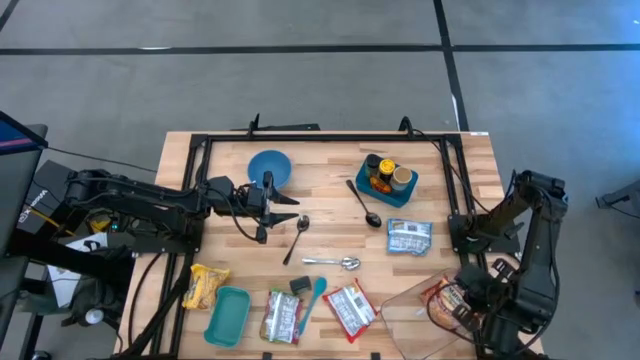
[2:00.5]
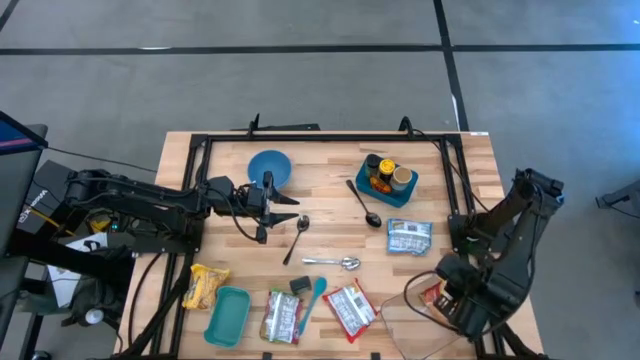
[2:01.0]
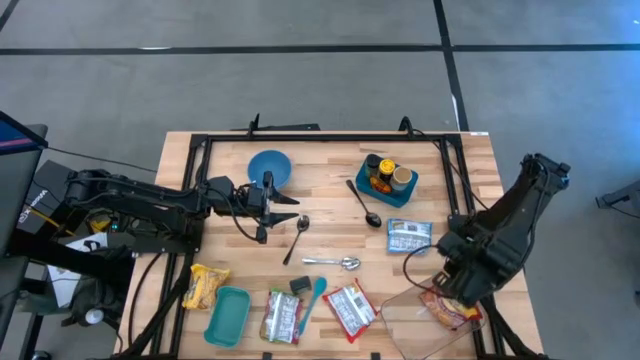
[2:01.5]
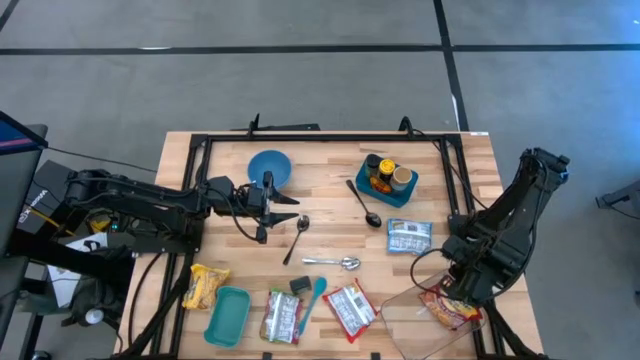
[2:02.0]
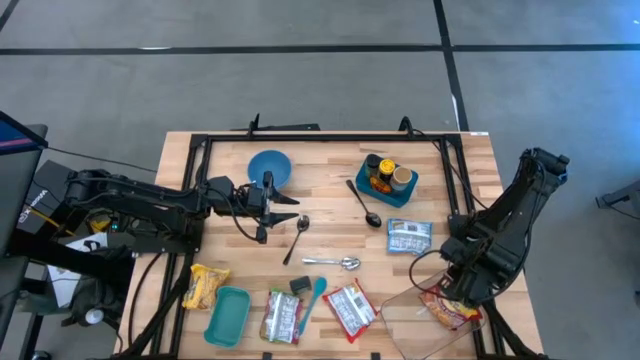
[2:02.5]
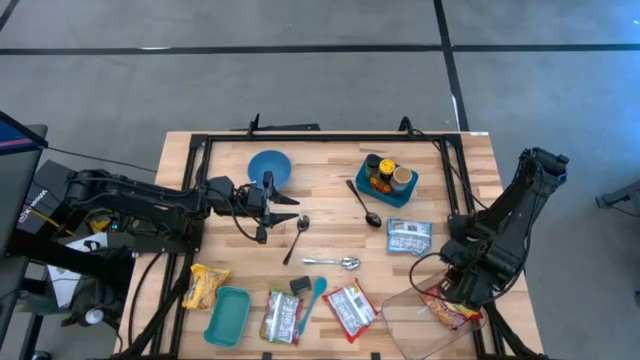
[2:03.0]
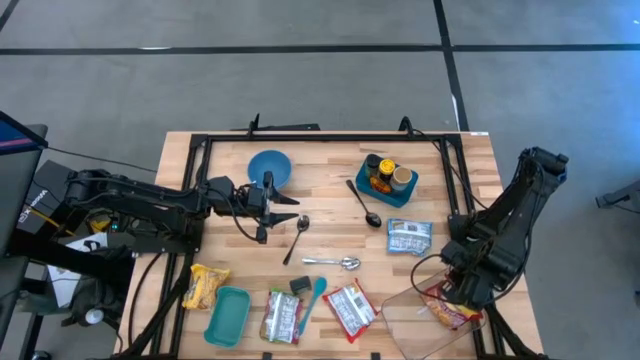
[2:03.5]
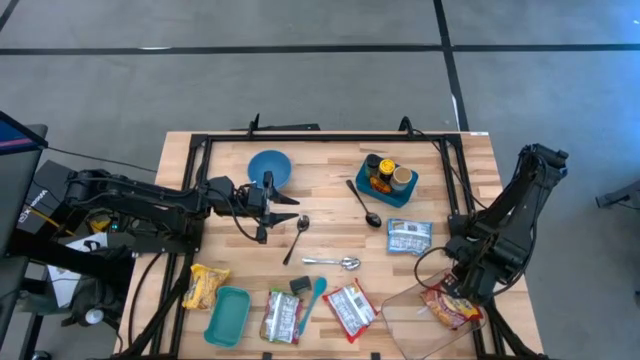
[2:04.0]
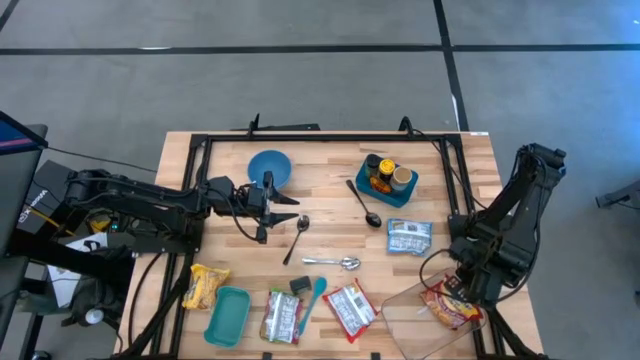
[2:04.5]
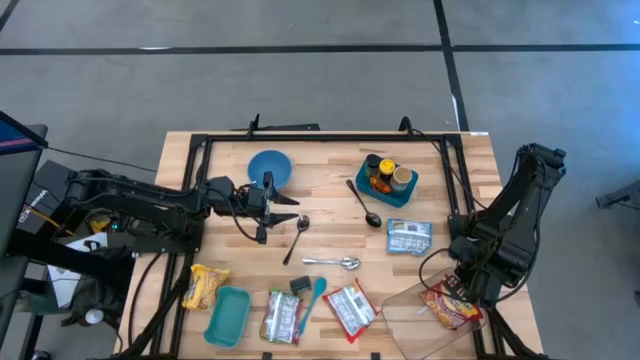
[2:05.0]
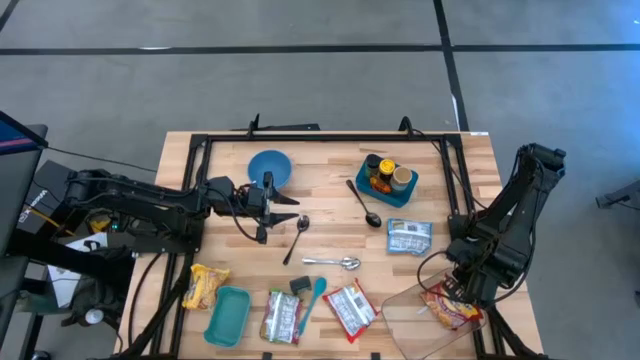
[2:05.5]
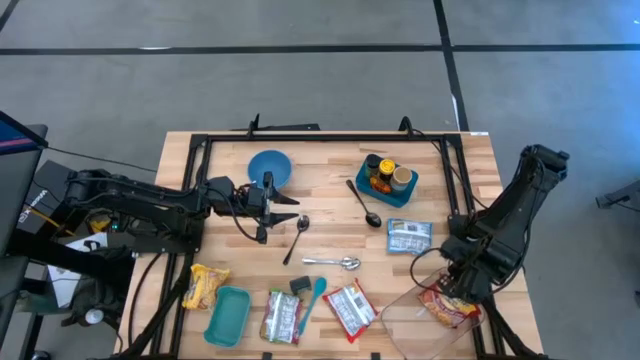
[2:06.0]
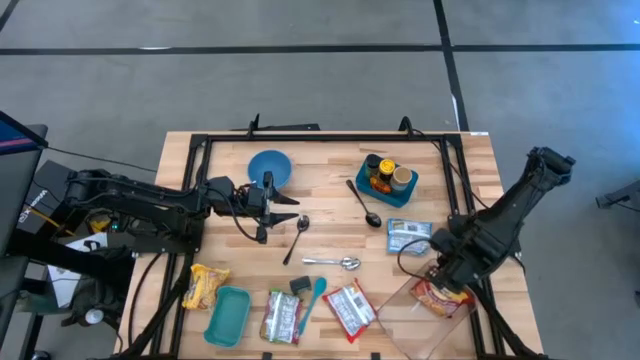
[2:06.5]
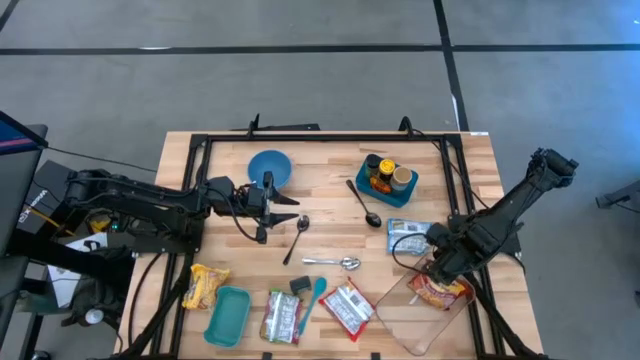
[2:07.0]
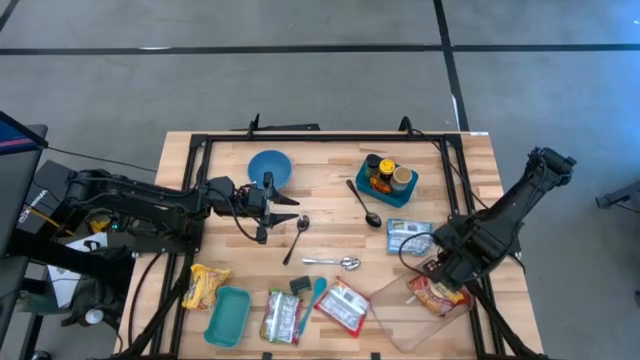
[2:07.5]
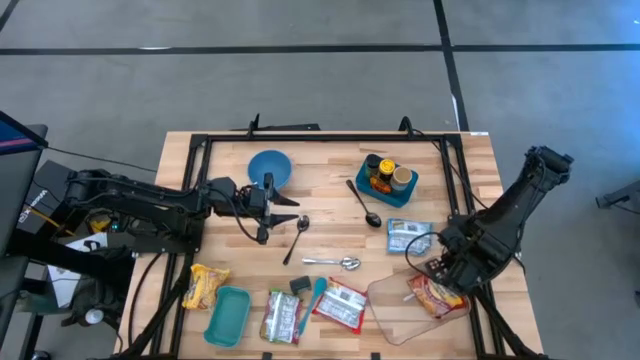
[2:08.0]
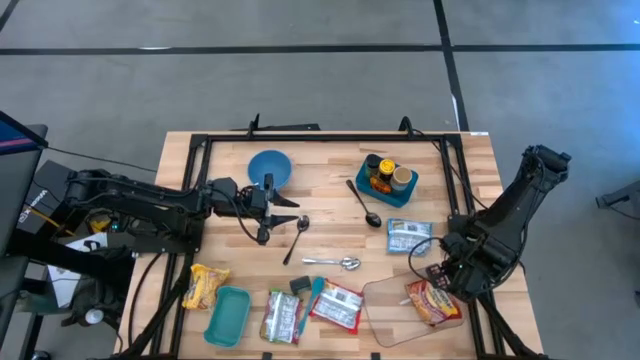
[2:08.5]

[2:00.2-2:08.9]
Task: Pick & Place Food Item
Adjust the transparent bin

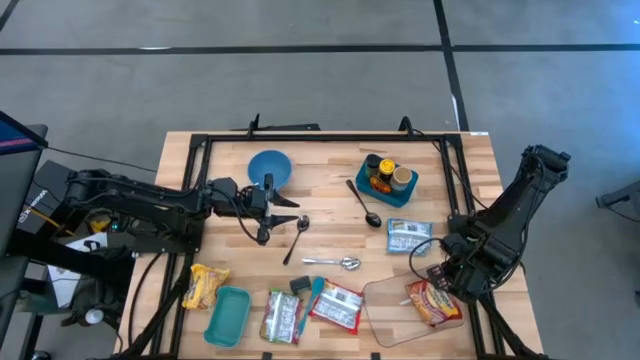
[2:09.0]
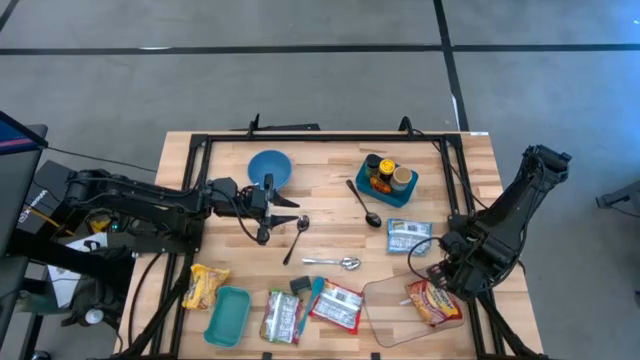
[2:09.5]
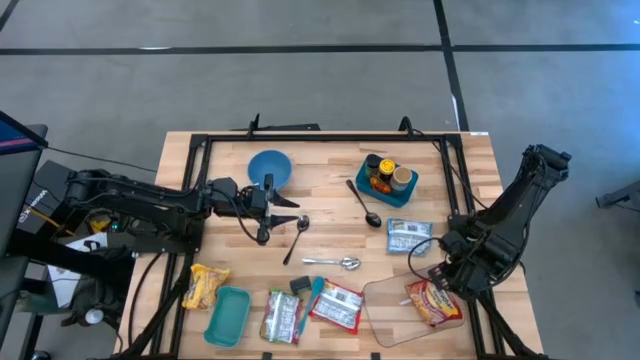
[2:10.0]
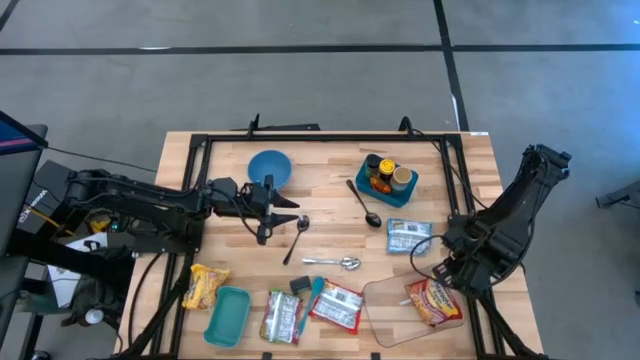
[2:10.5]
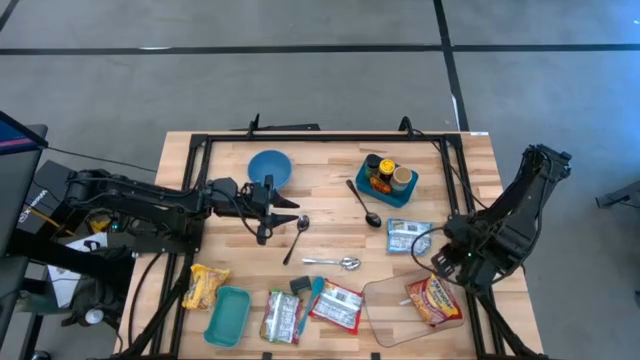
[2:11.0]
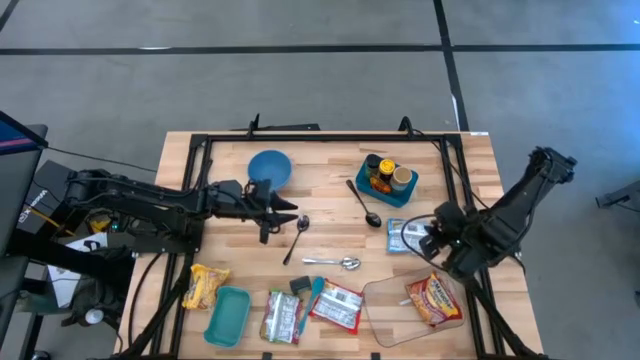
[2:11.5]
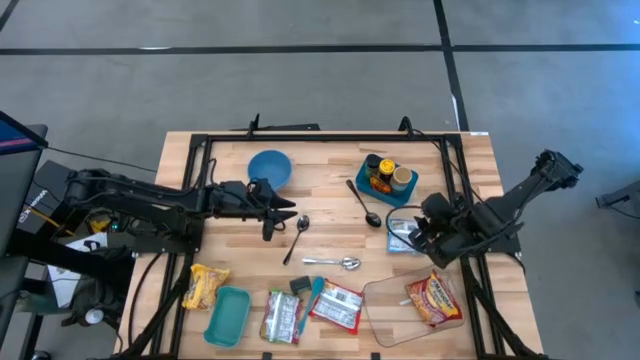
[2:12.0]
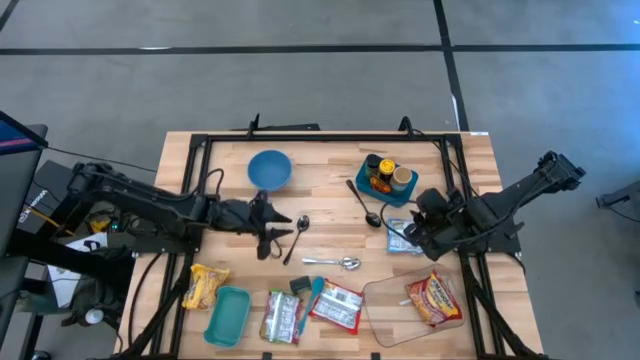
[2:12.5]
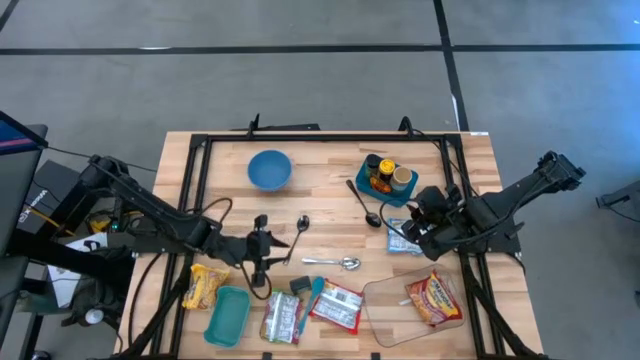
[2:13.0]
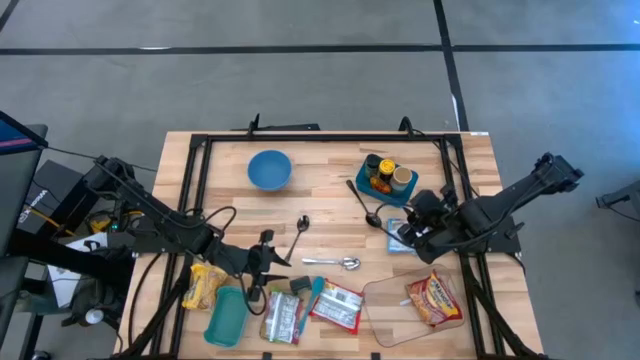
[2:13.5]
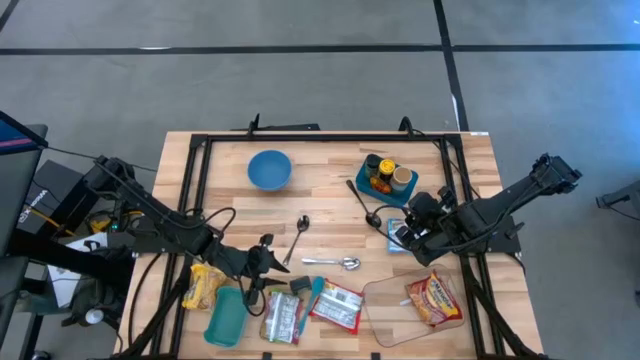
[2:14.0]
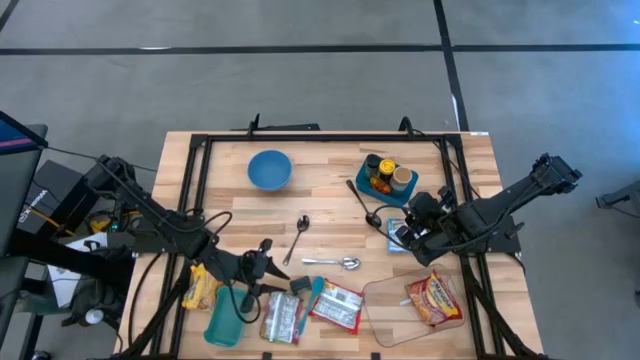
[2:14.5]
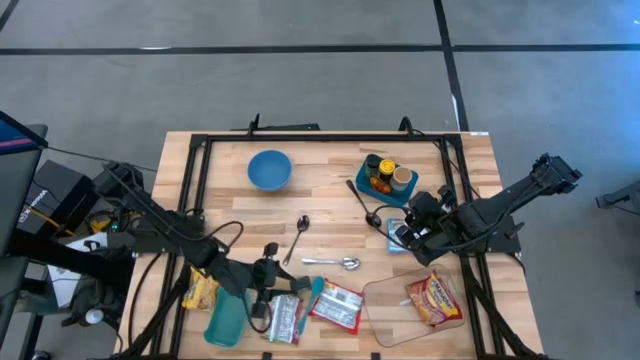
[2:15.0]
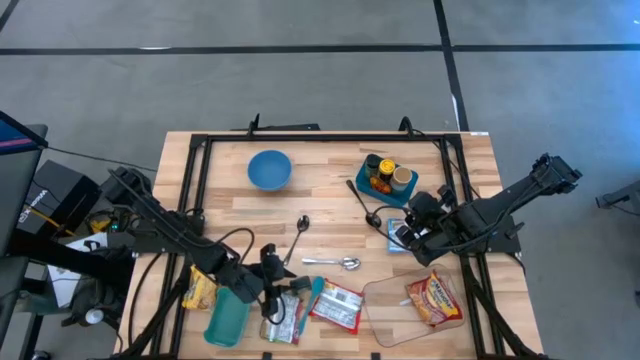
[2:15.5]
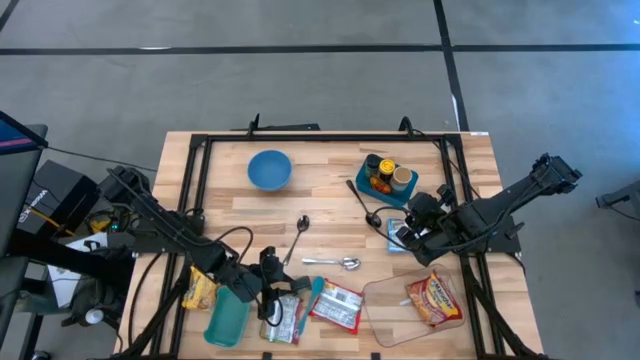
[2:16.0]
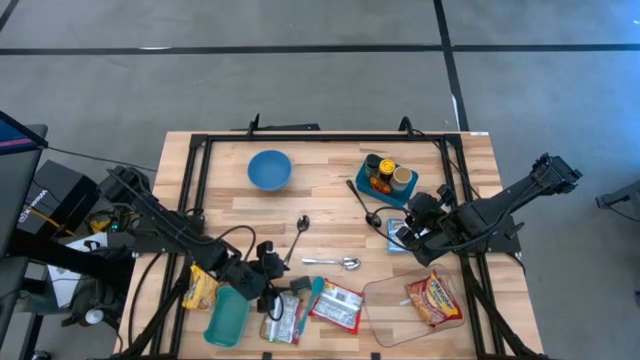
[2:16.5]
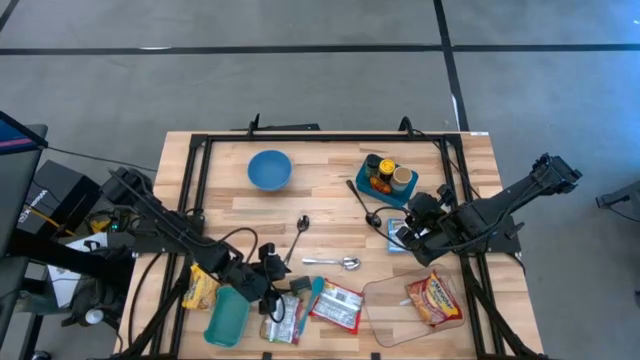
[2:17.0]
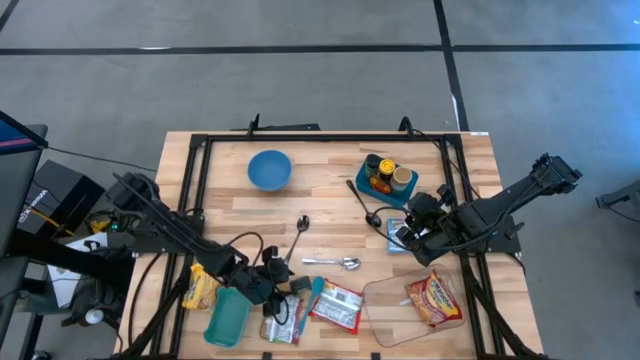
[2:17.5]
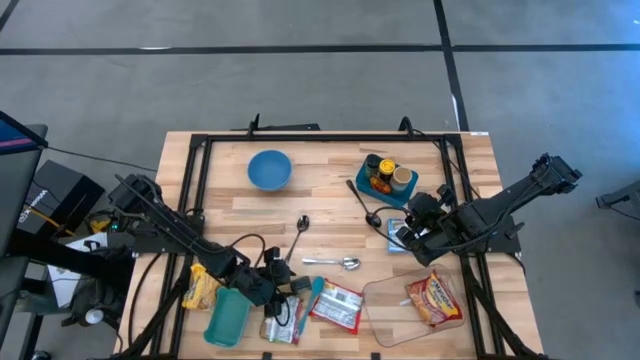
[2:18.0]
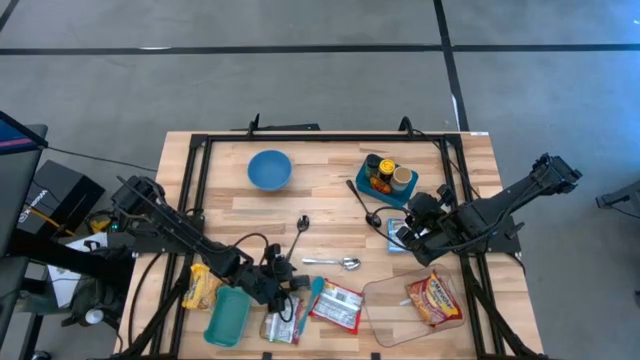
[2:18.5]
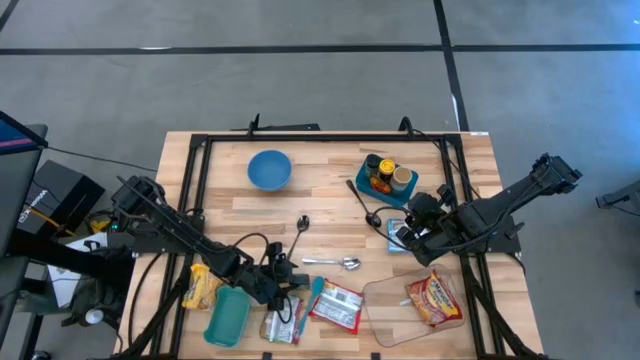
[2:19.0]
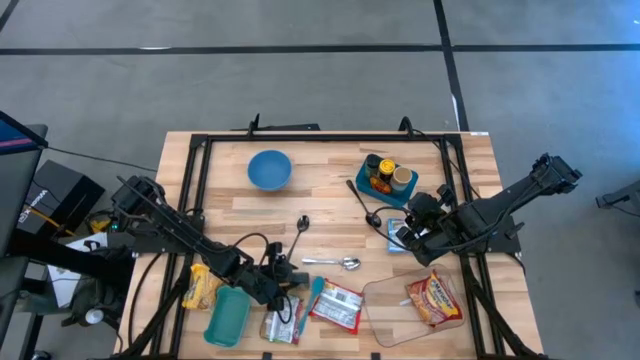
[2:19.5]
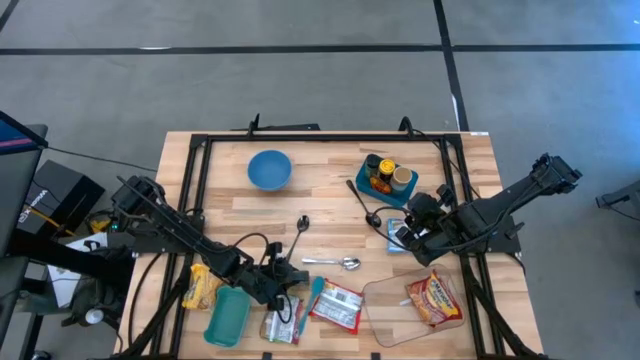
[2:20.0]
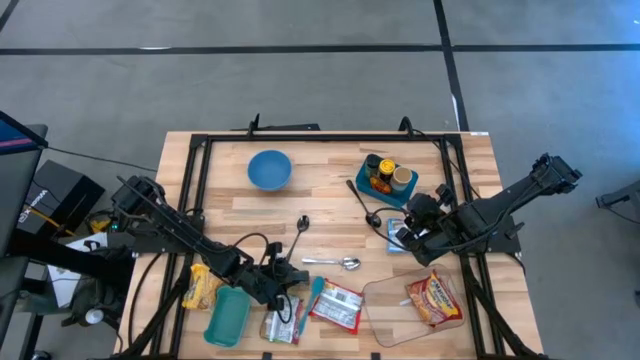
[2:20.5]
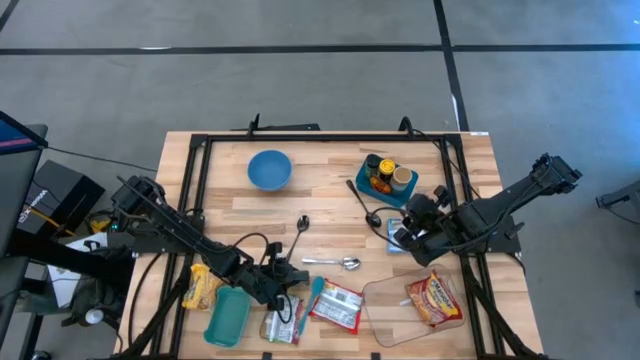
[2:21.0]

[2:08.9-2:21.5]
Put the black seasoning can into the blue bin

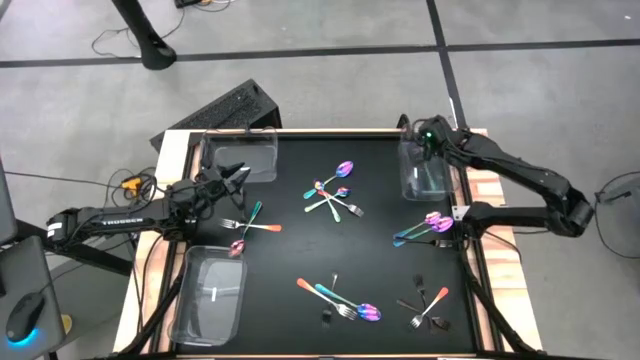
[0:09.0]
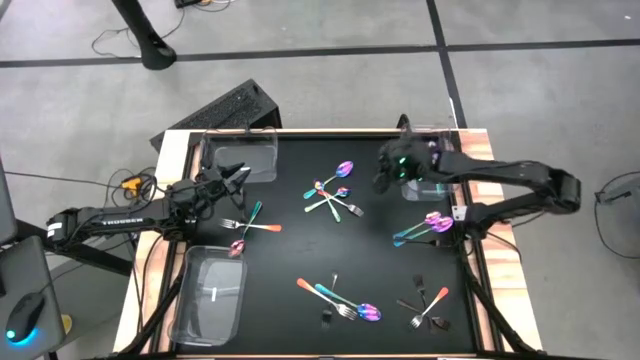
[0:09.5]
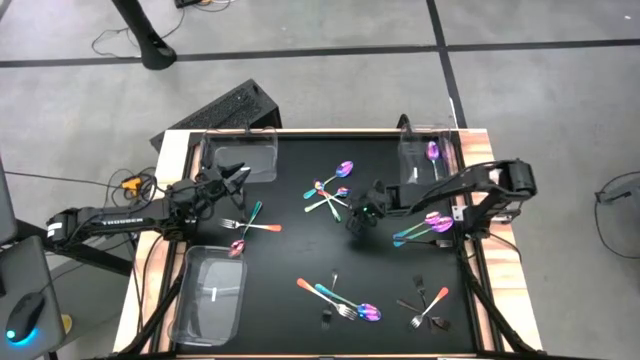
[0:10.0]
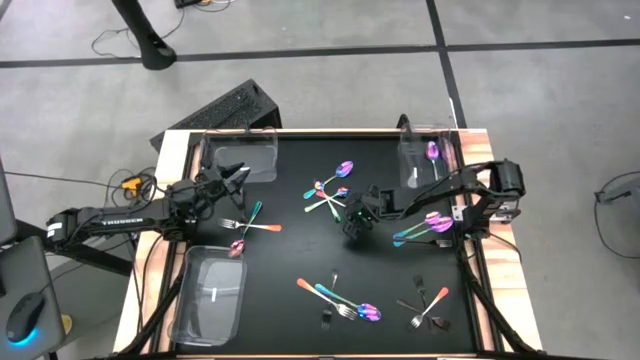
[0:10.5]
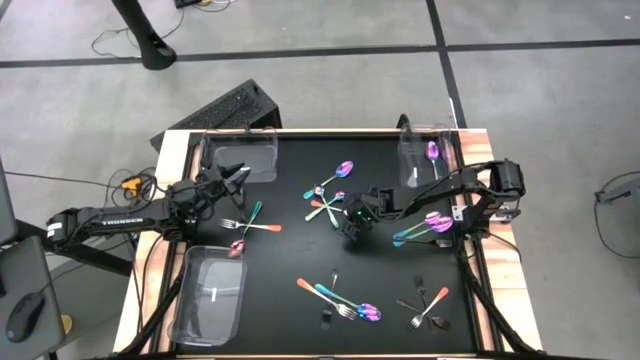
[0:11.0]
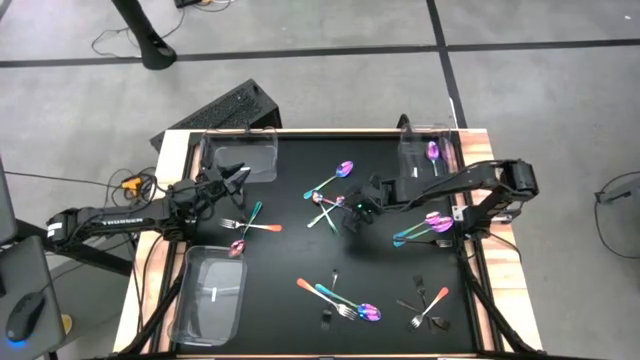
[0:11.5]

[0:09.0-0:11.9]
Task: Sort silverware by color (type)
Put the orange fork into the top left transparent bin
